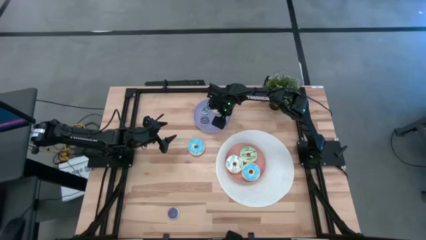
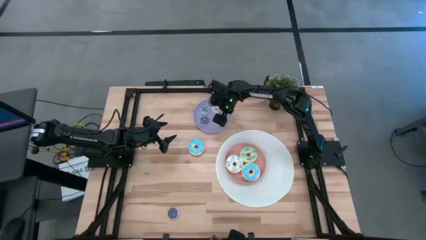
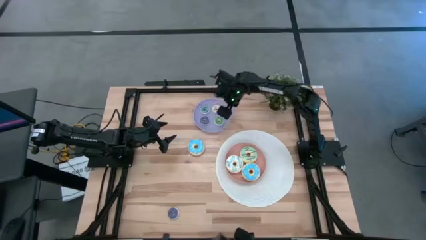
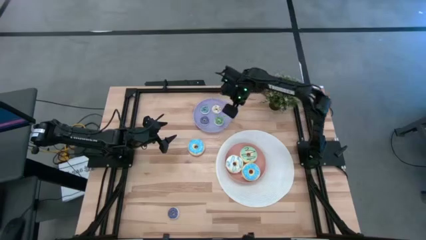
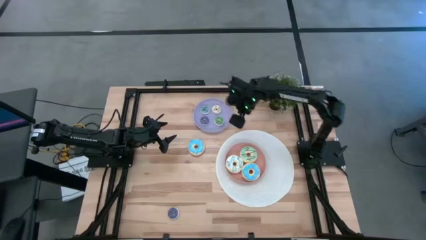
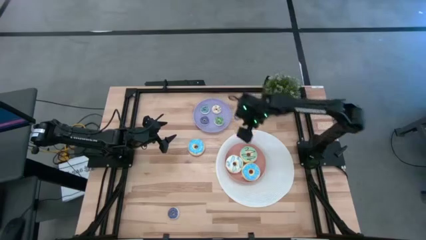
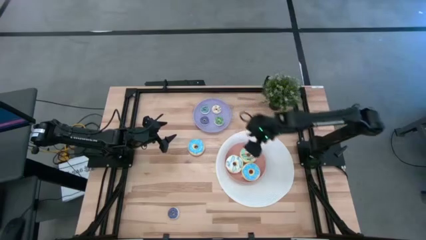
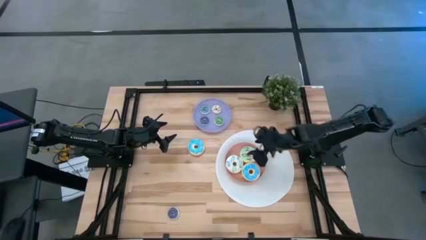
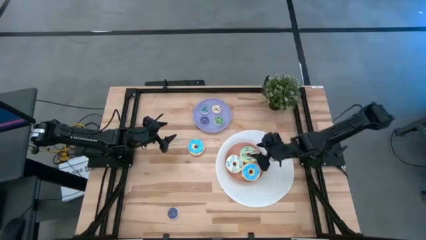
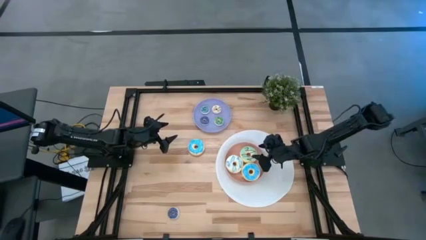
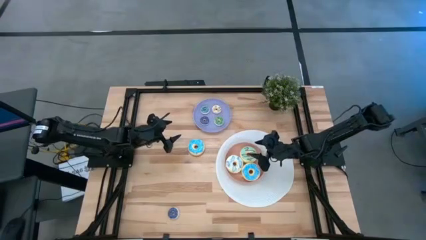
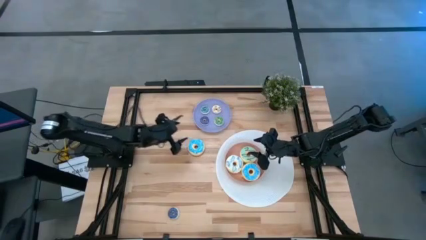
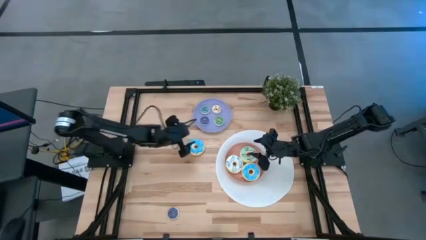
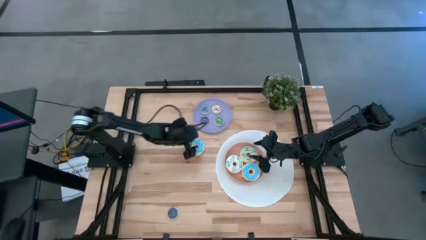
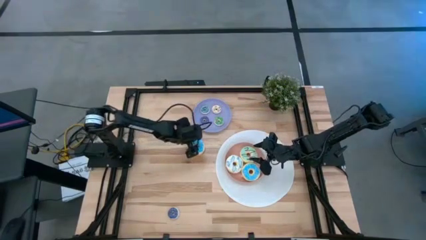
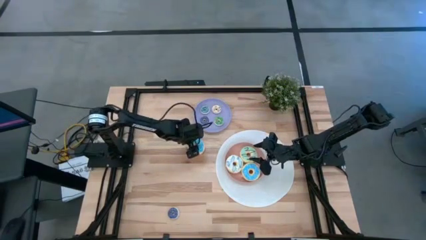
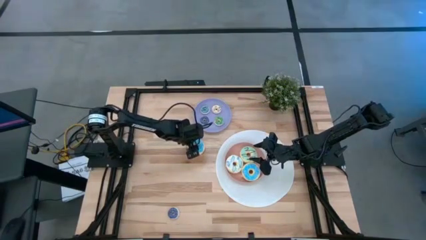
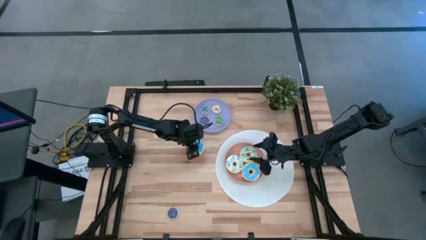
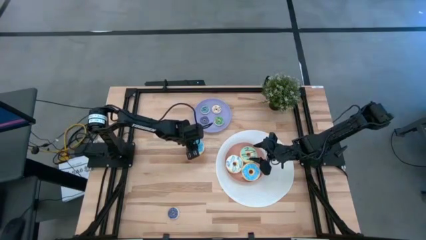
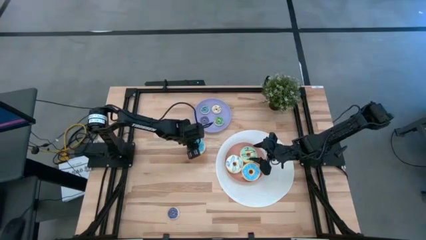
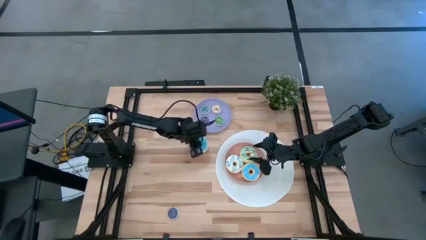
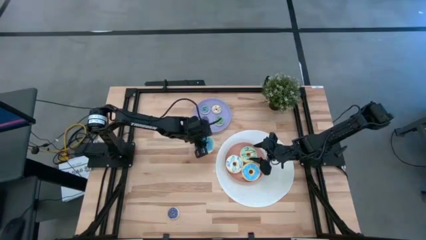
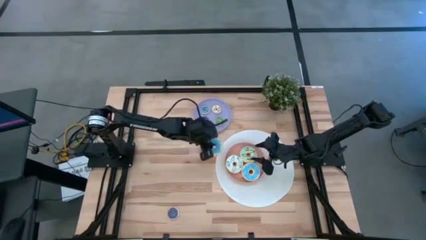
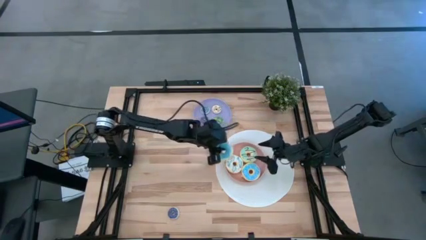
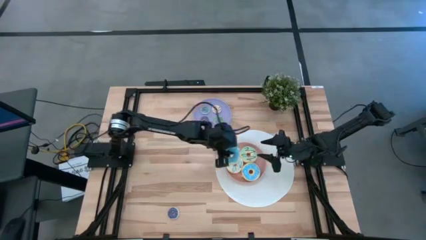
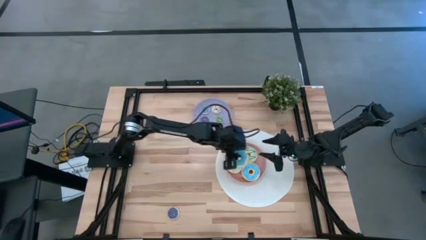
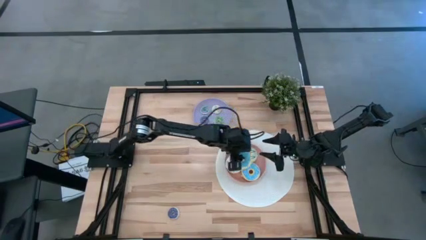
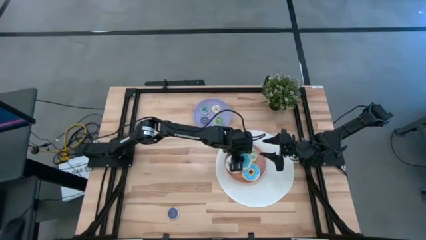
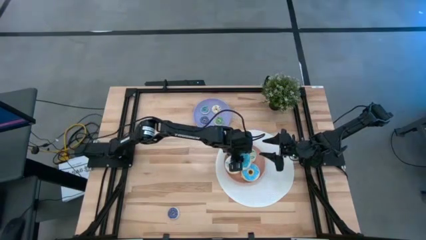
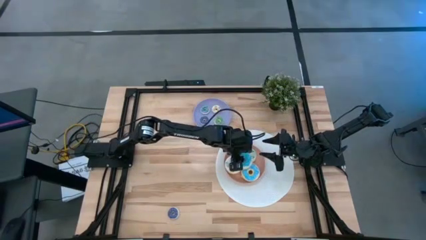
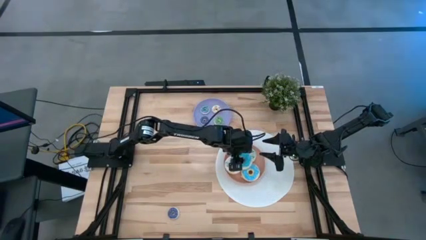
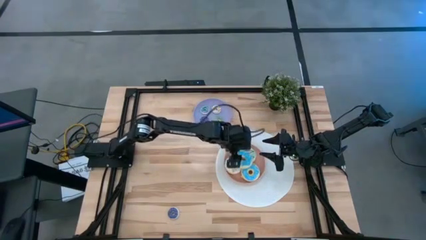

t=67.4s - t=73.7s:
Task: Pick & Place donuts
Put the big light blue donut on the orange plate

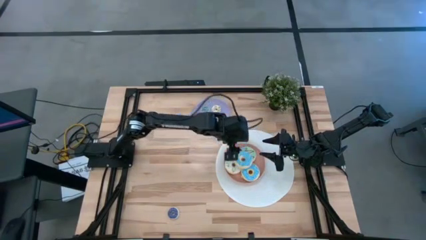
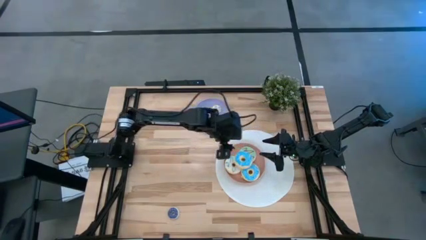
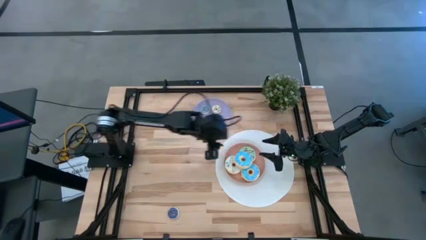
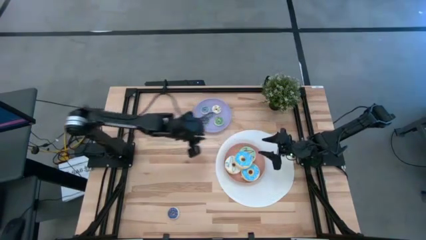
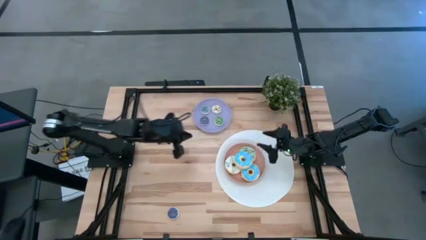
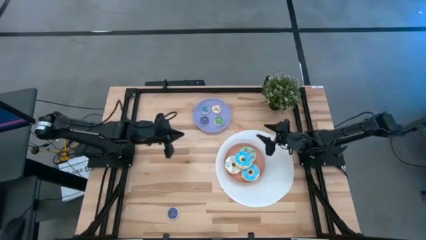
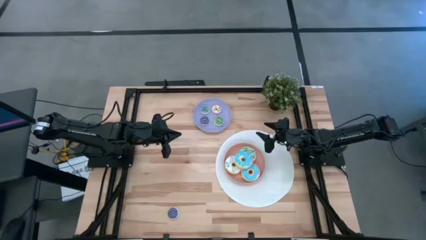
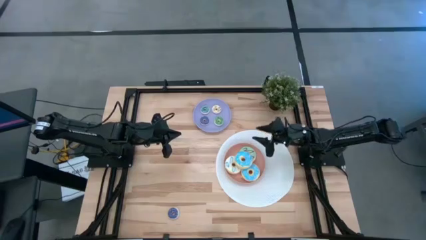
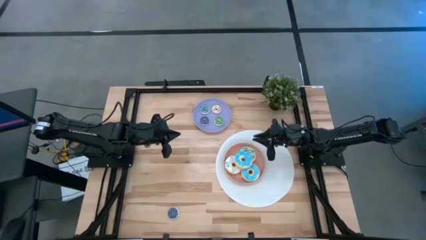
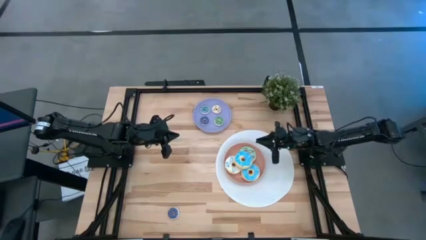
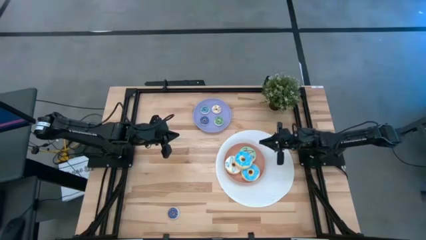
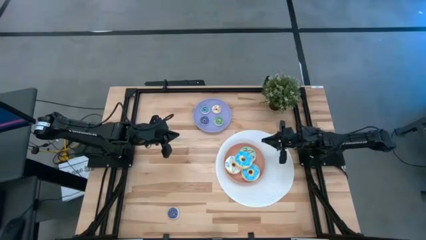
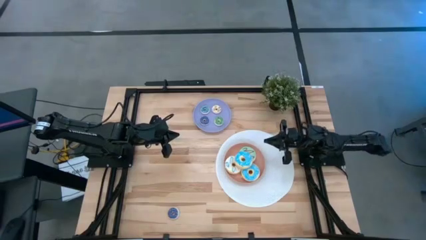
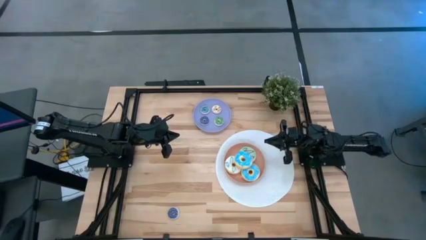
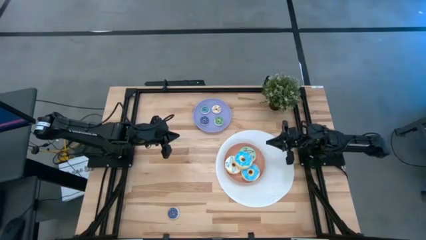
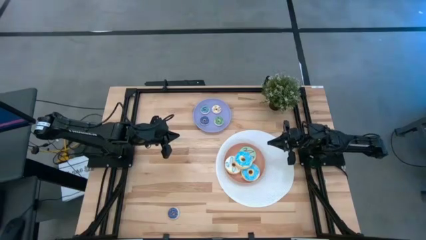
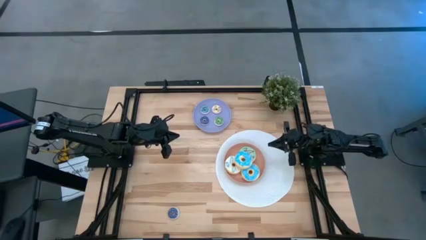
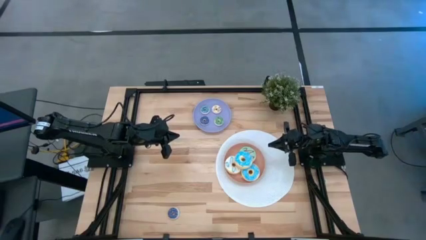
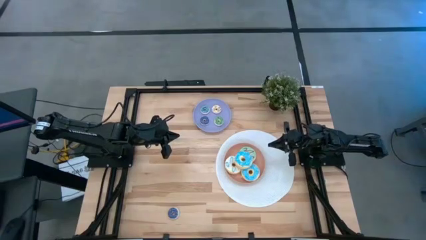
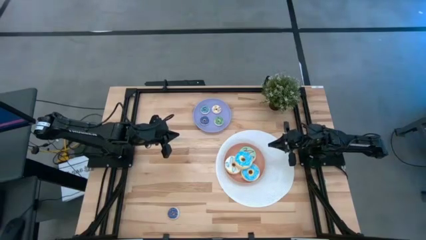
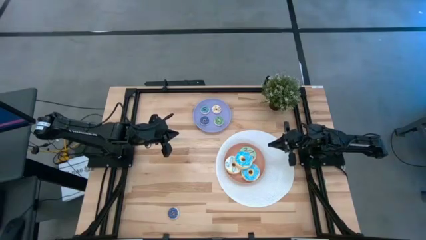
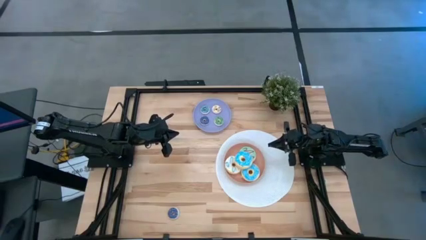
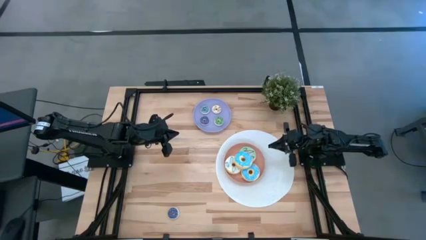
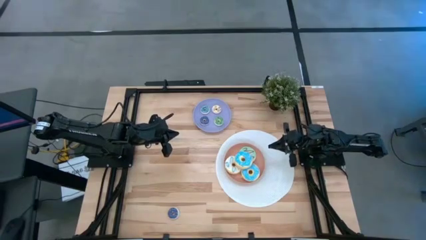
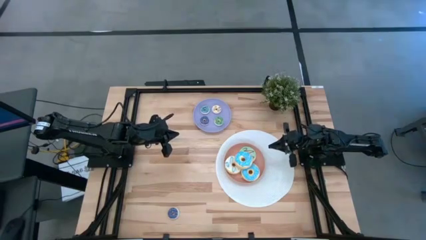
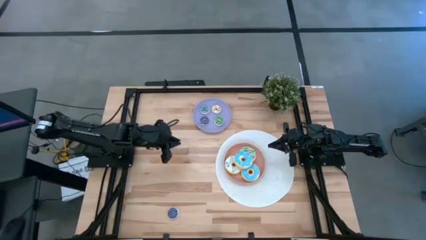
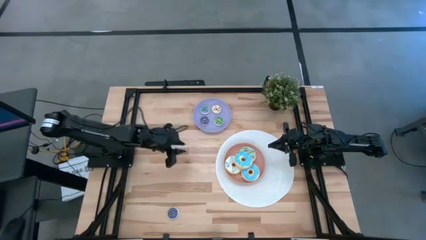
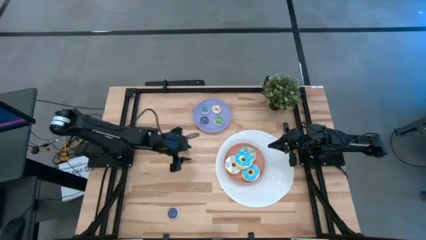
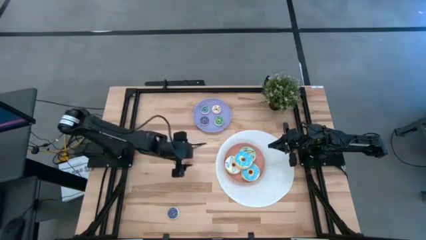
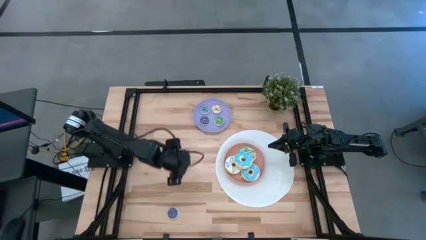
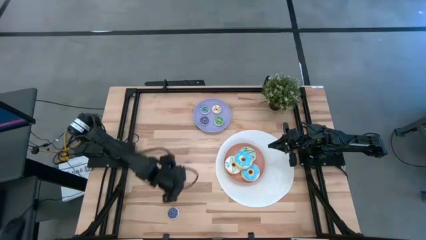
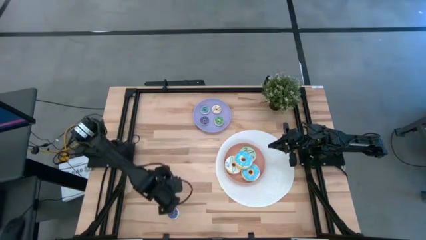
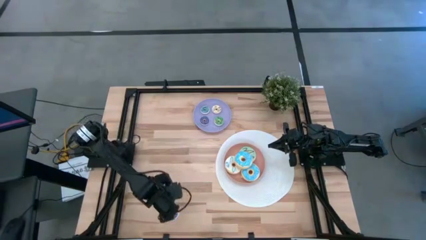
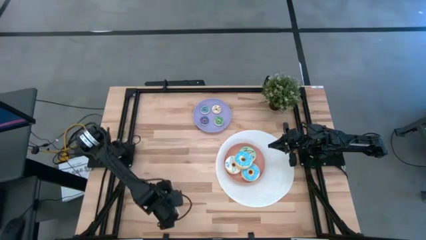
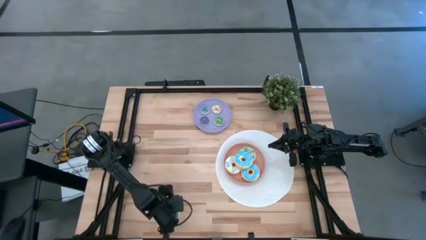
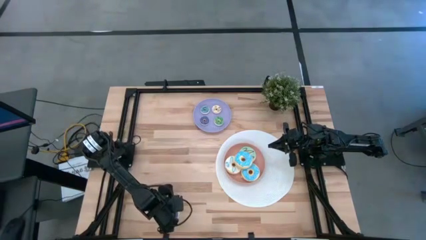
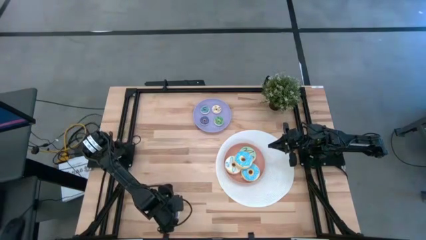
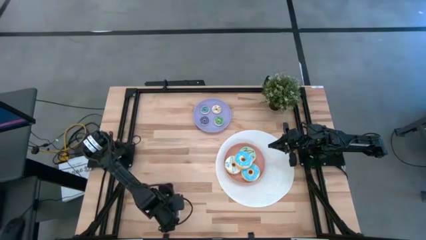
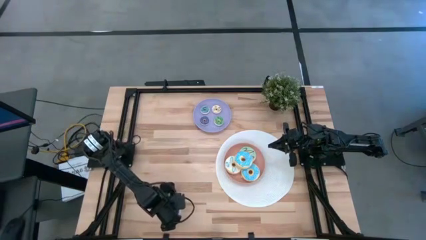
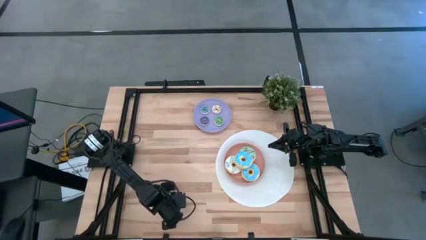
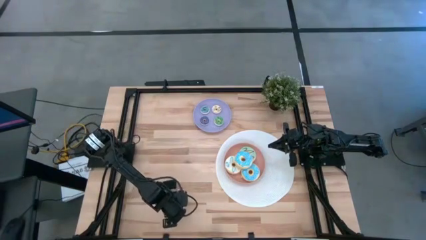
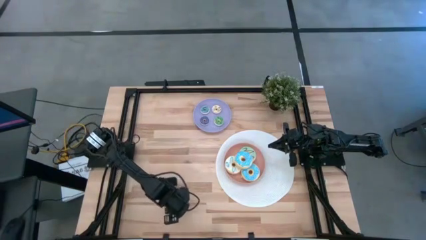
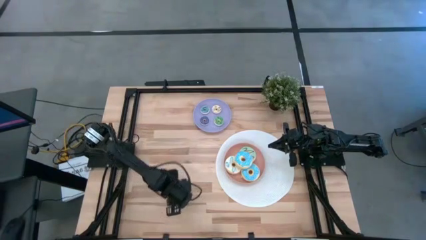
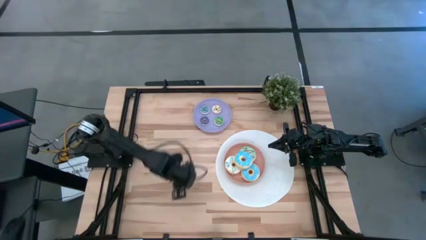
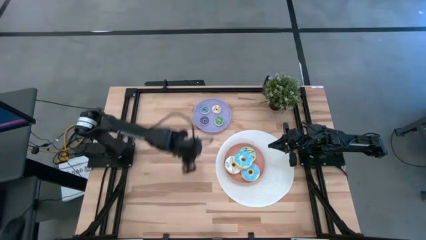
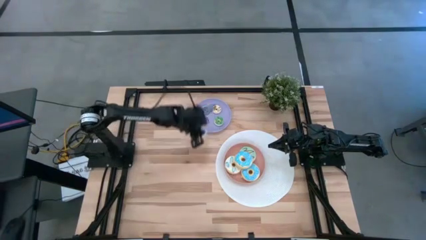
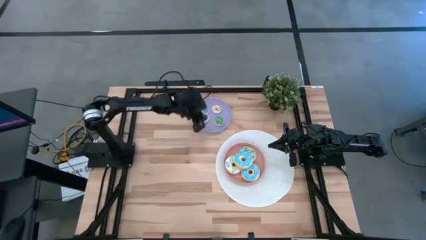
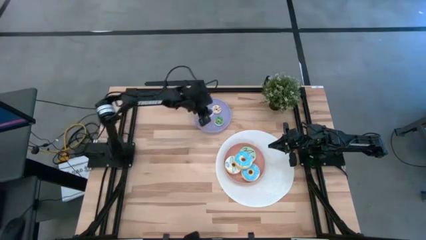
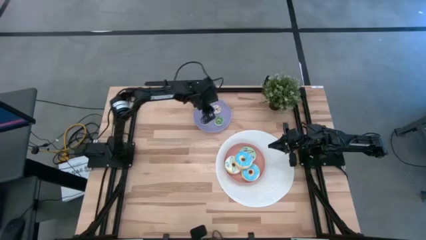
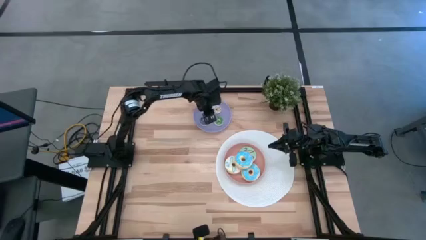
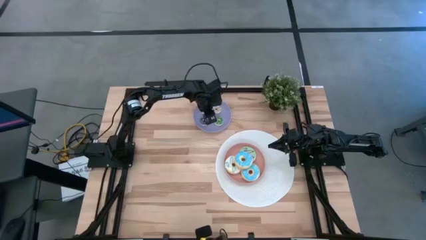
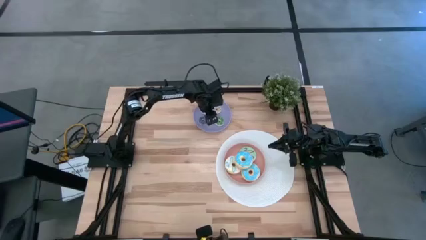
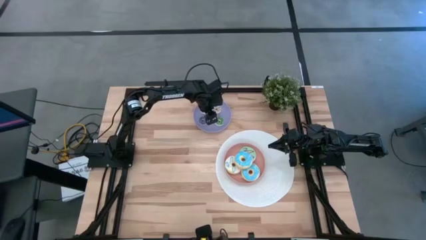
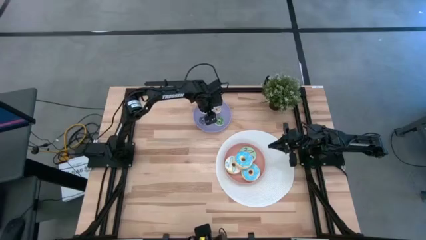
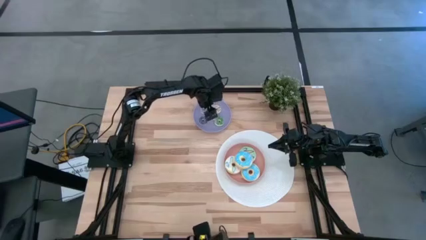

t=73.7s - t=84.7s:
Put the small dark blue donut on the violet plate
